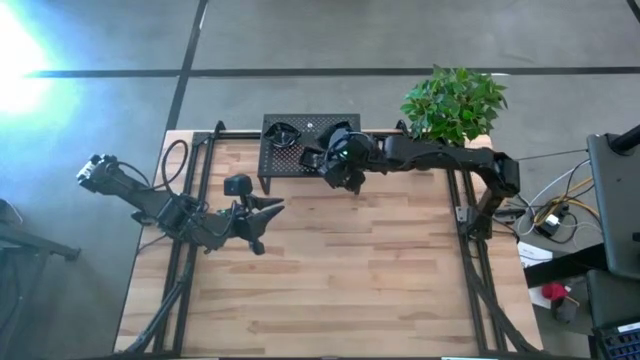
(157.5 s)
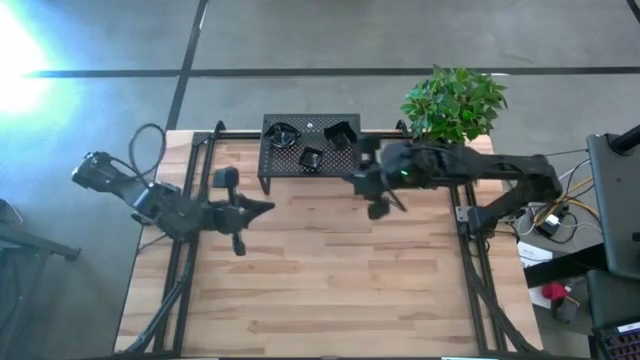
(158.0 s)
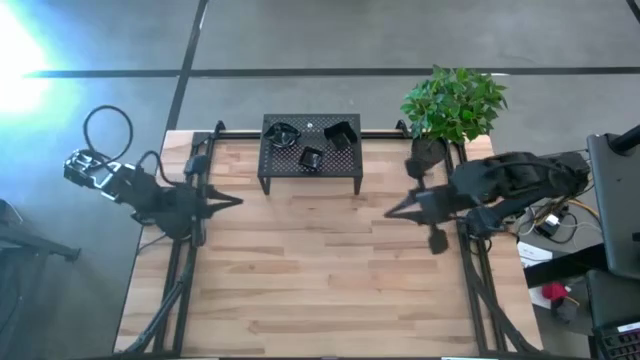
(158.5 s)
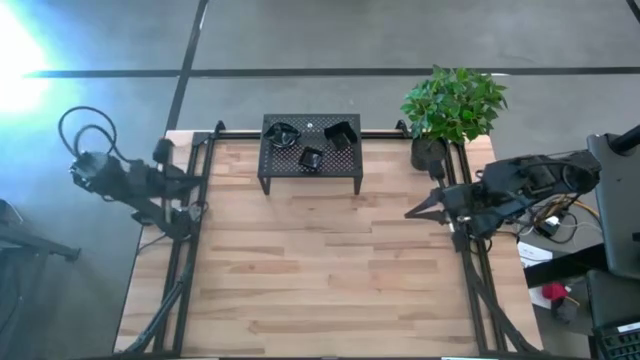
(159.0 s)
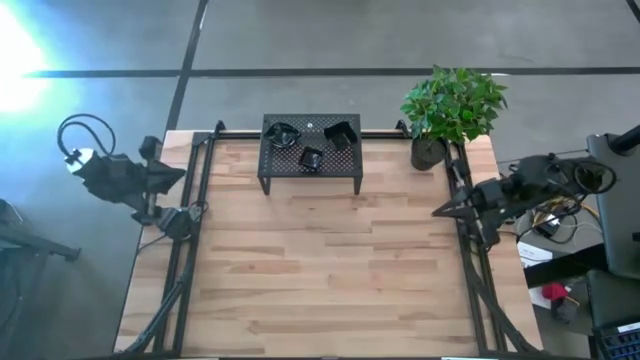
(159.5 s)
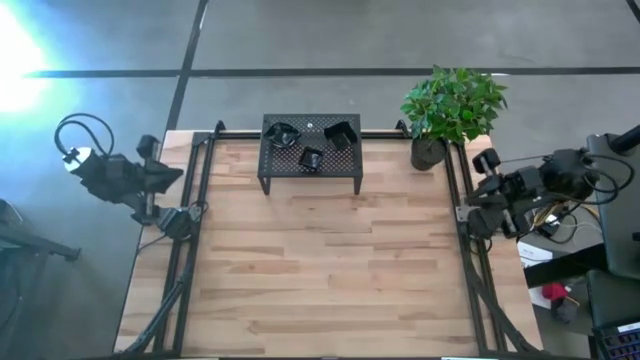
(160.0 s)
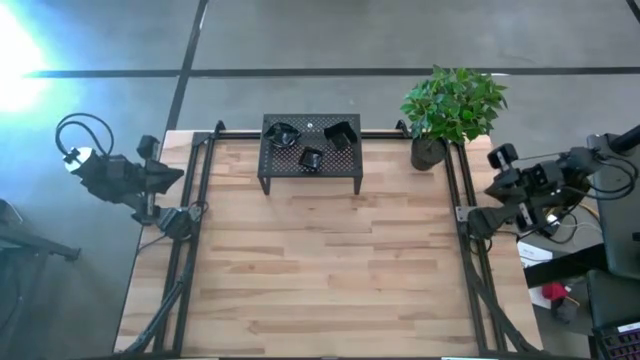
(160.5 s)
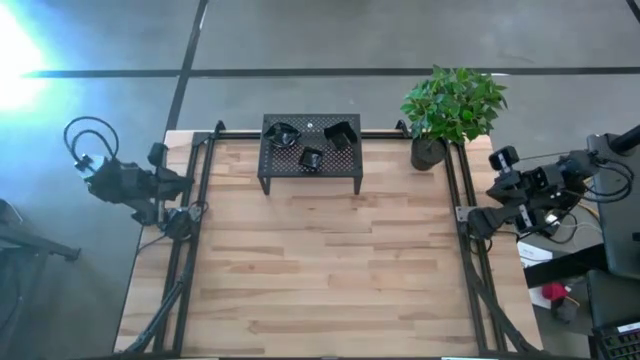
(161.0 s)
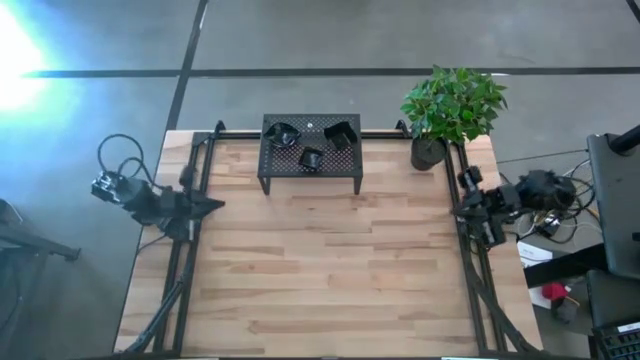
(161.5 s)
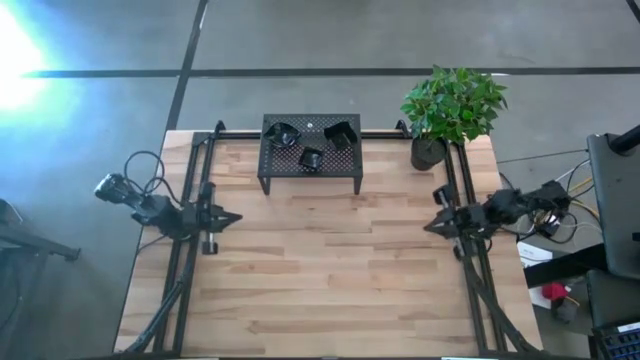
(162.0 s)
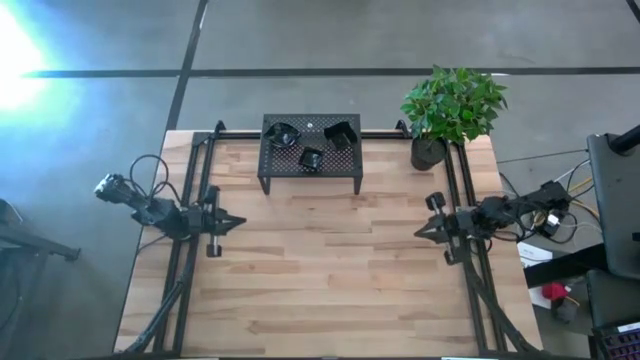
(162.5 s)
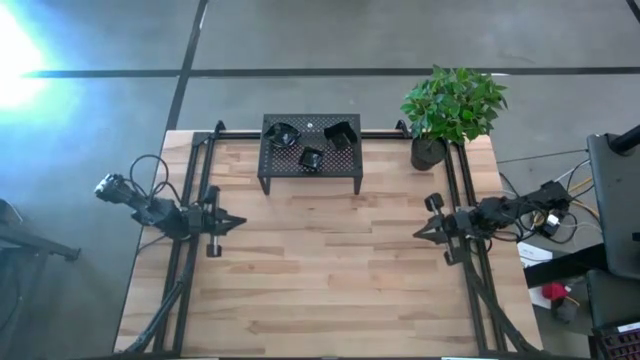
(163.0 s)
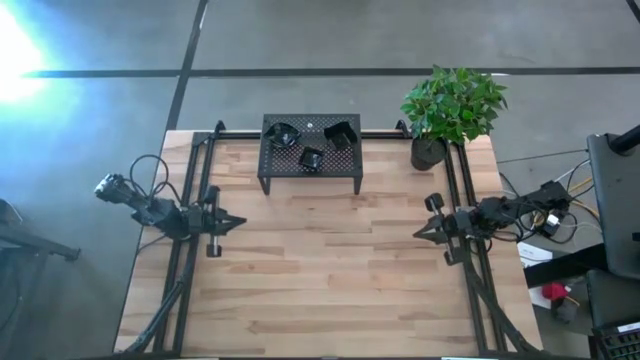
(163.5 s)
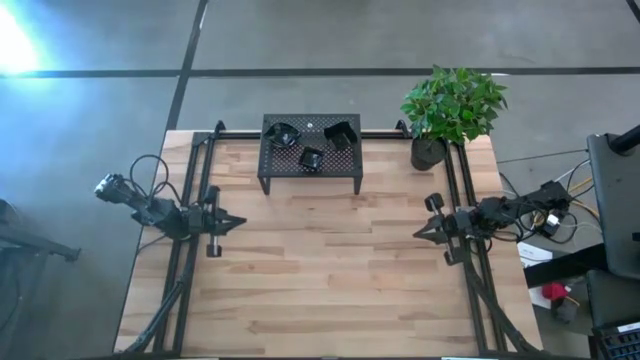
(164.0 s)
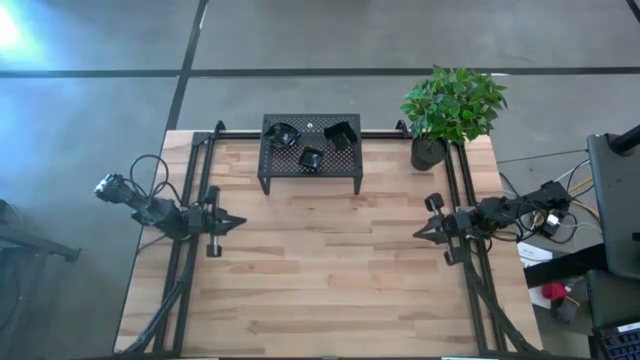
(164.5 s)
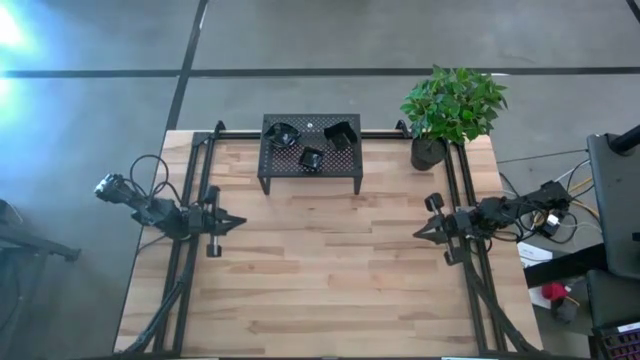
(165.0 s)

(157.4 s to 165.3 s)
Task: Pick & Place Mini shaped plates
Return to Home Position

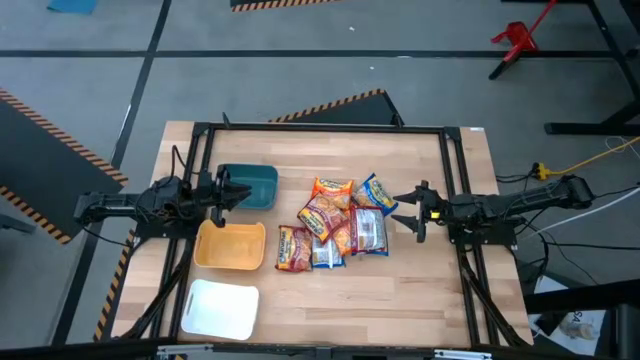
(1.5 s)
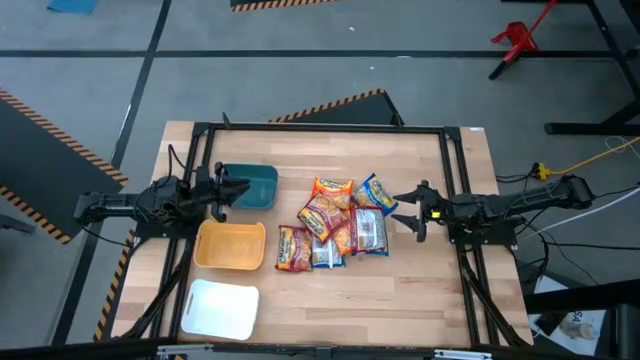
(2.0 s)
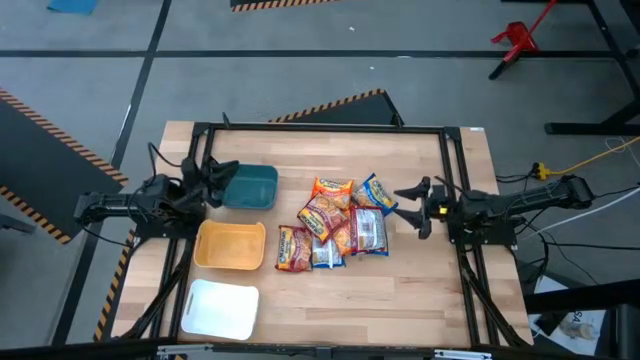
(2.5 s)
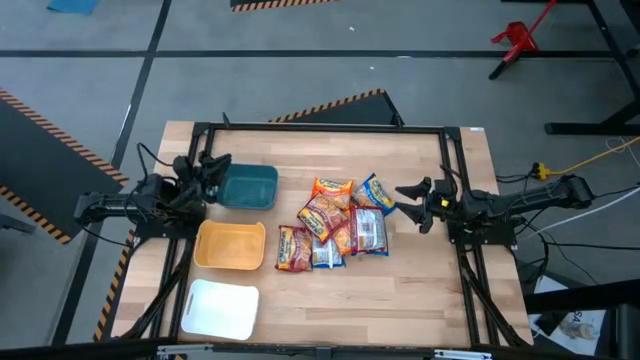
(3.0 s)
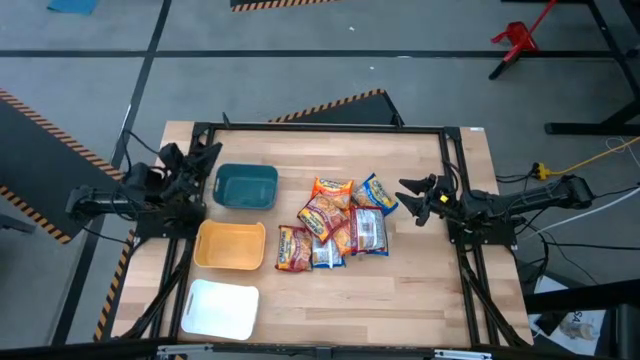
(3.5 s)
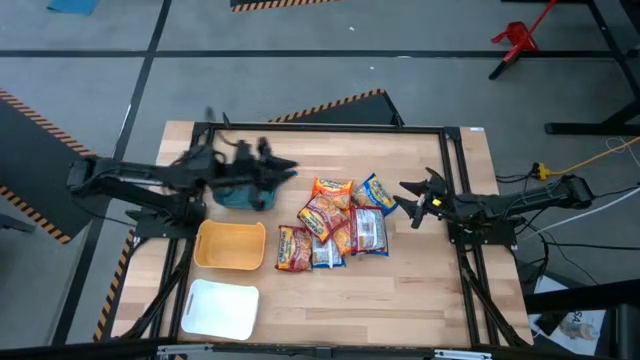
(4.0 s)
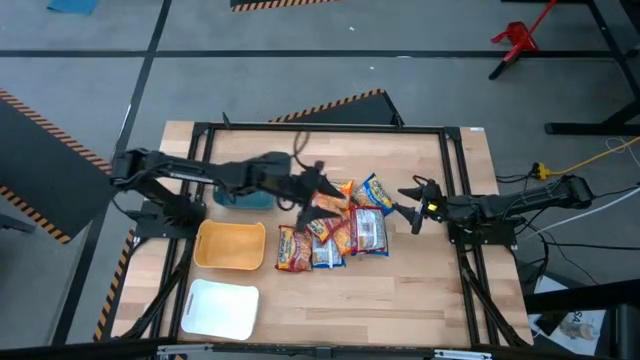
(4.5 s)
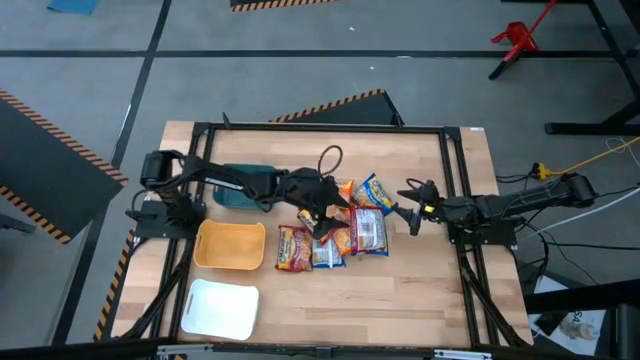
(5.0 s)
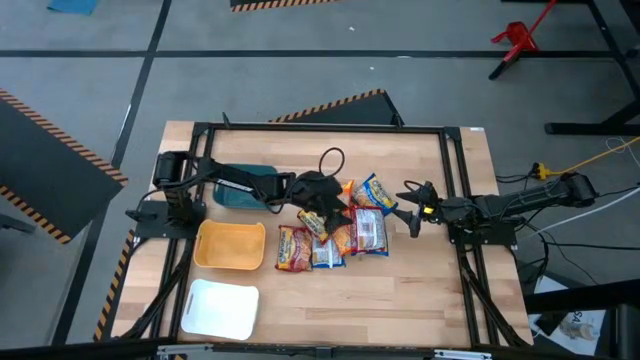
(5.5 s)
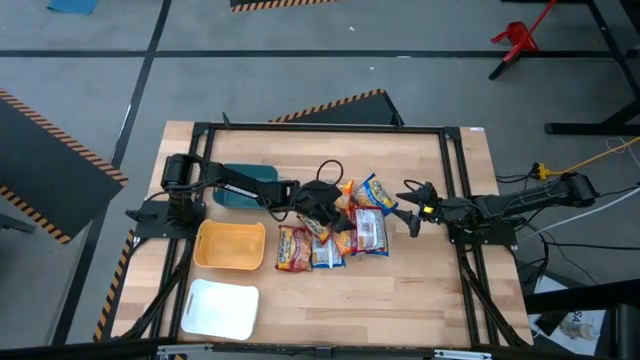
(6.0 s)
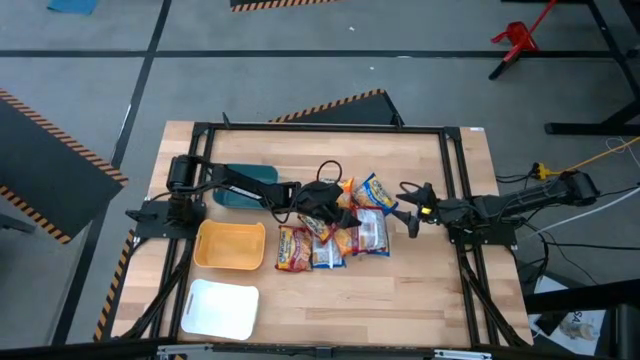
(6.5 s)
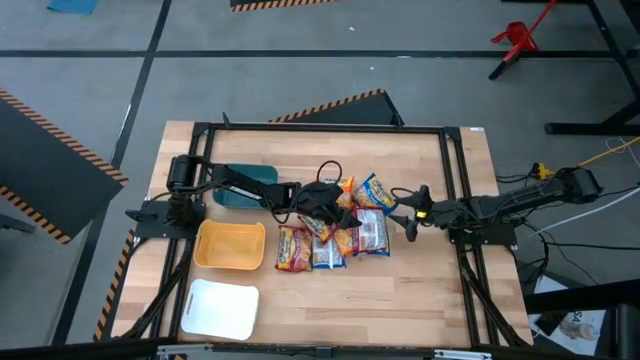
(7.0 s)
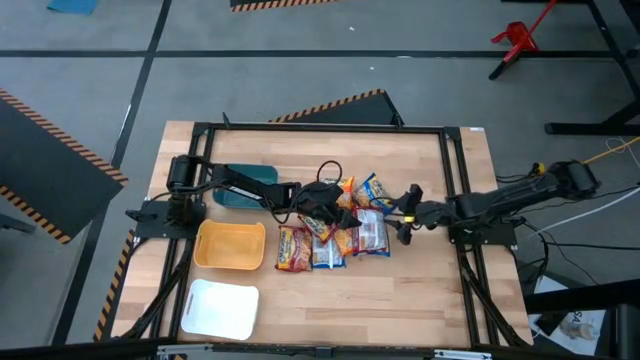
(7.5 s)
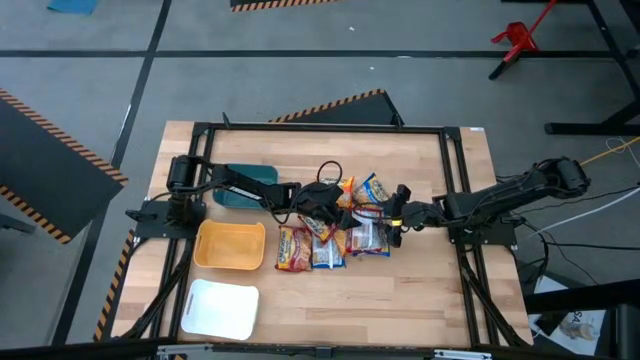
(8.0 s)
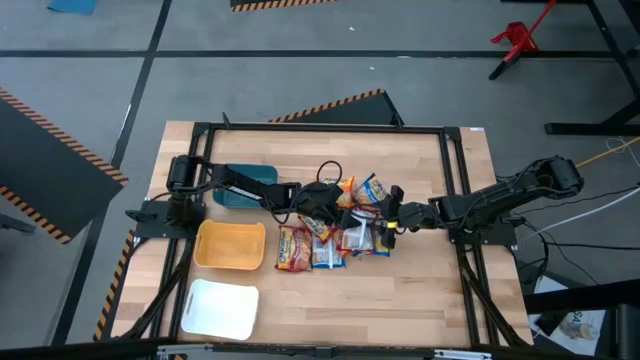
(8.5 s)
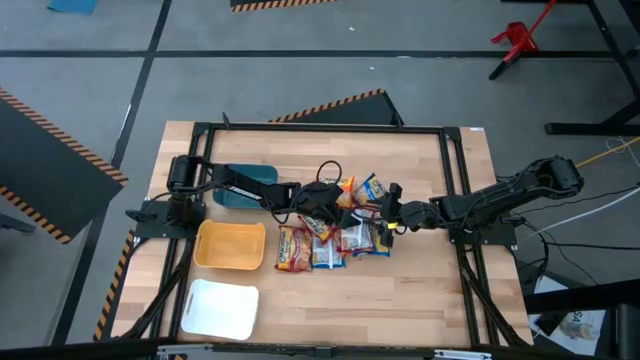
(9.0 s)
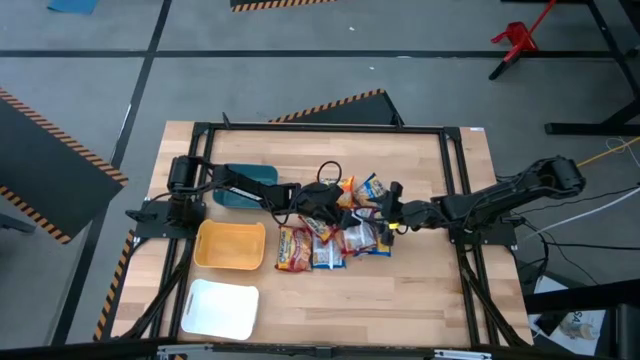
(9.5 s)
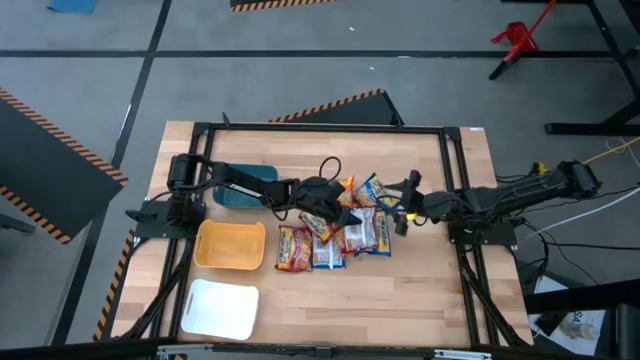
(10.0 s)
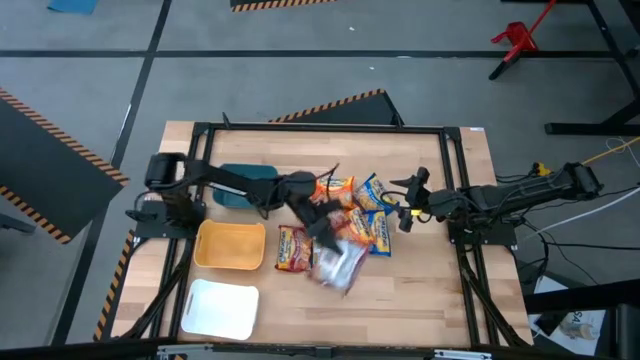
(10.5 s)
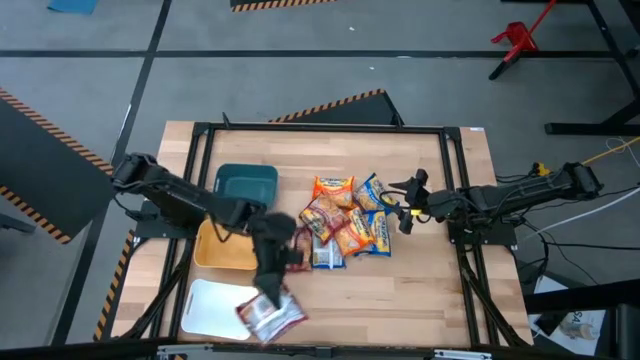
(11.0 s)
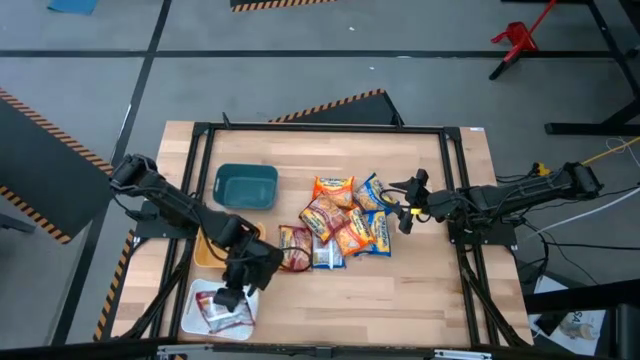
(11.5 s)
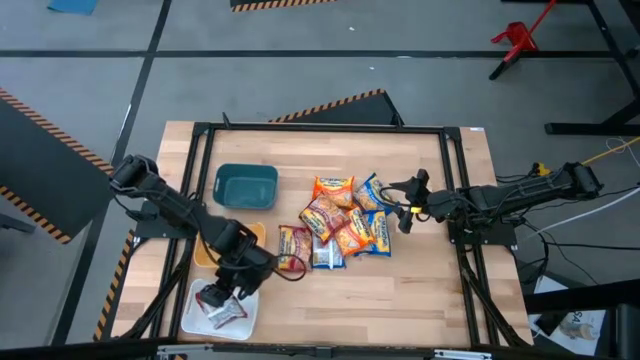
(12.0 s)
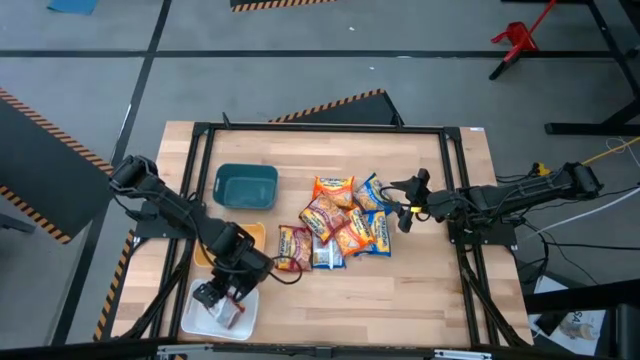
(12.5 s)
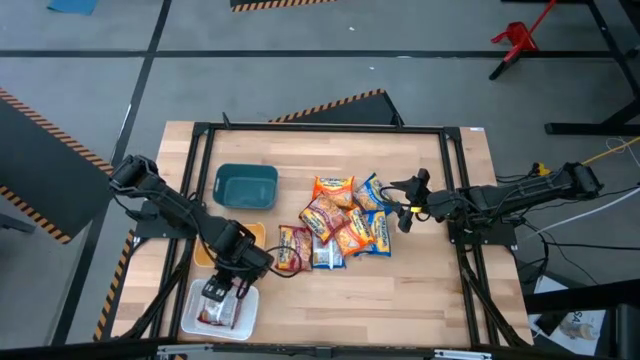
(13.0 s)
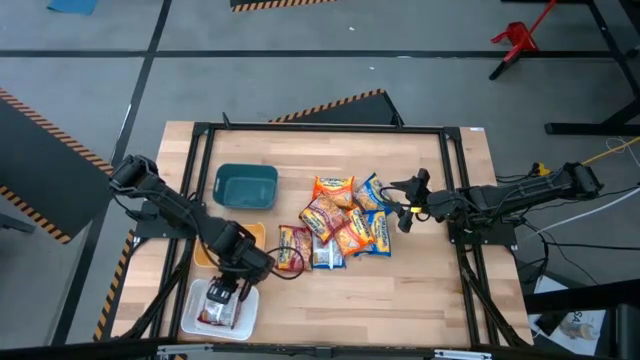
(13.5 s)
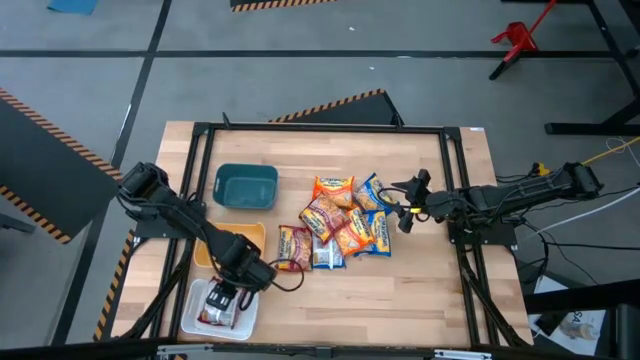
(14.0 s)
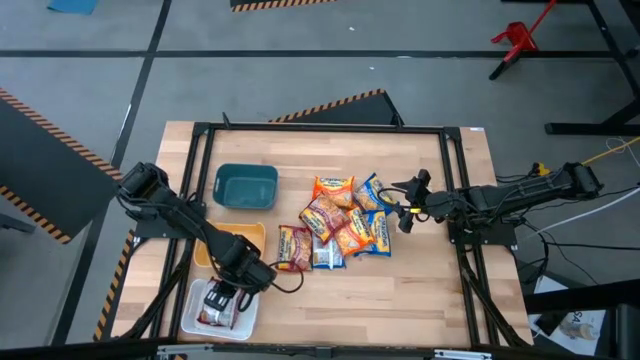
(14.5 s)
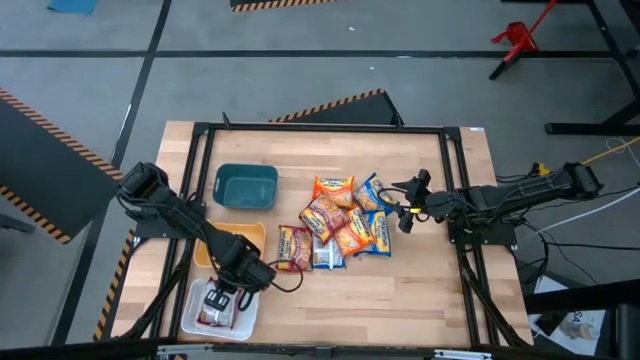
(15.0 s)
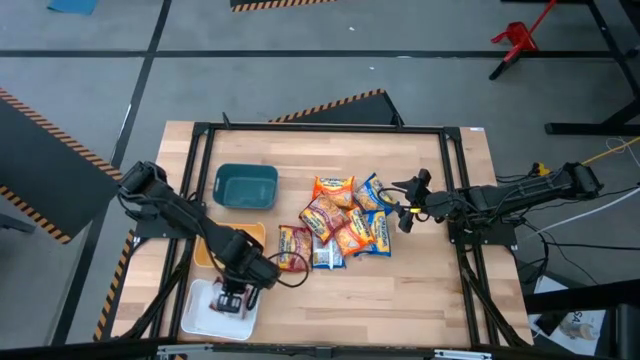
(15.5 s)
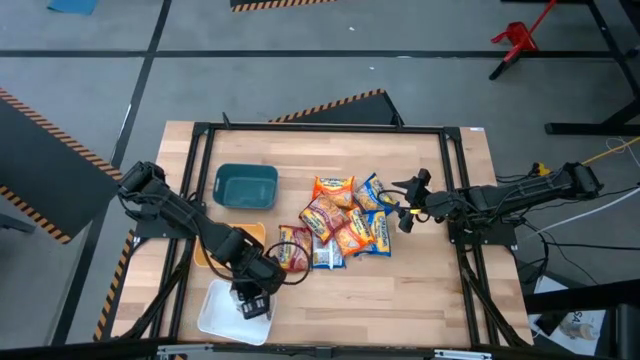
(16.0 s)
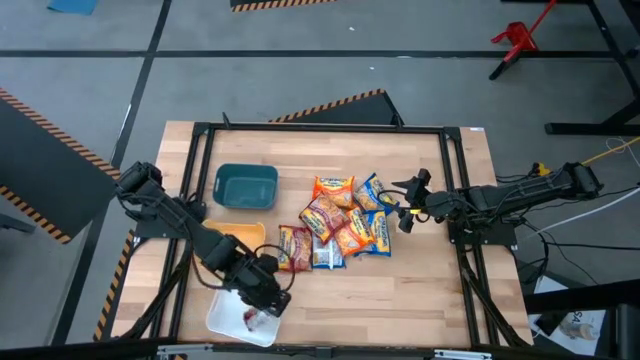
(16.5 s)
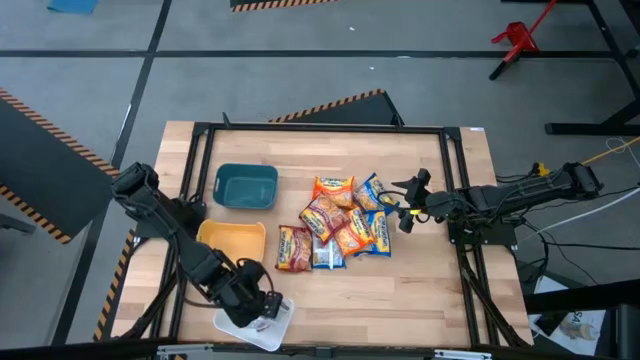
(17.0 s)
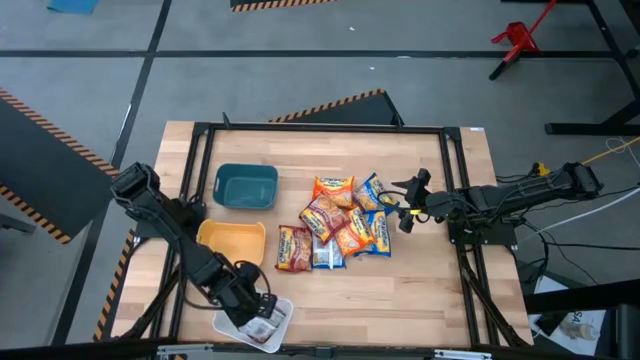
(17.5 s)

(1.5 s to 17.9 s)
Task: Sort Maruchan noodles
Put the right red noodle pack into the white bin
